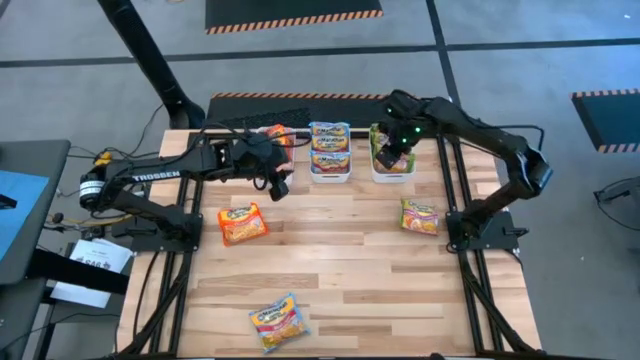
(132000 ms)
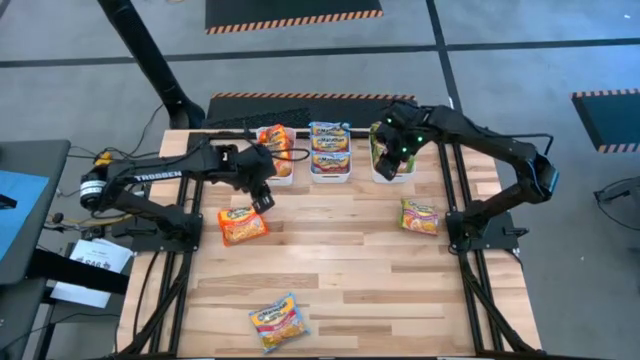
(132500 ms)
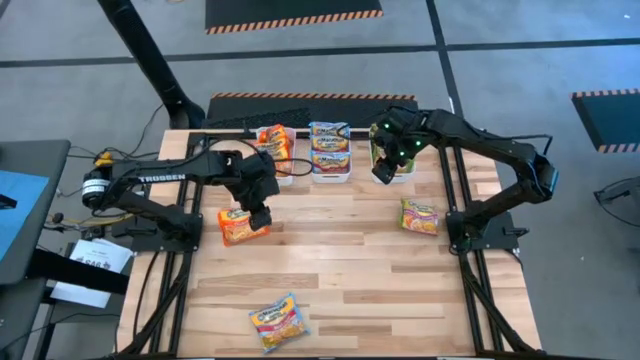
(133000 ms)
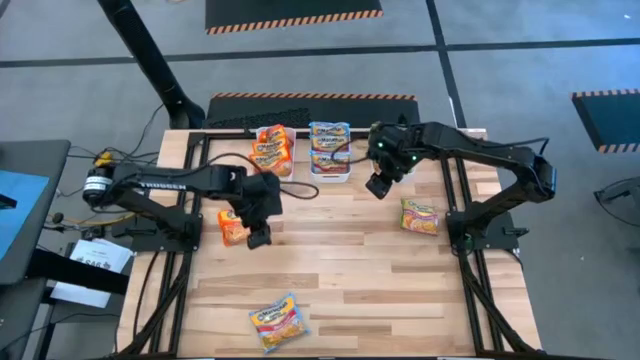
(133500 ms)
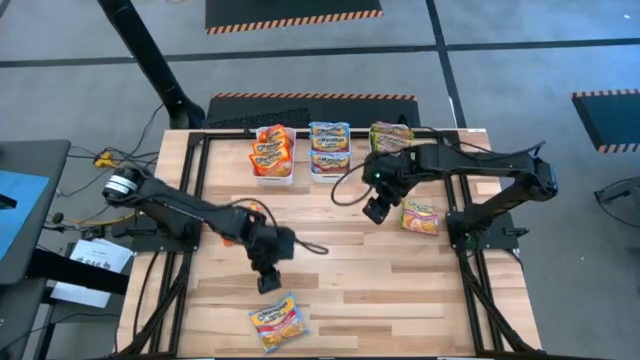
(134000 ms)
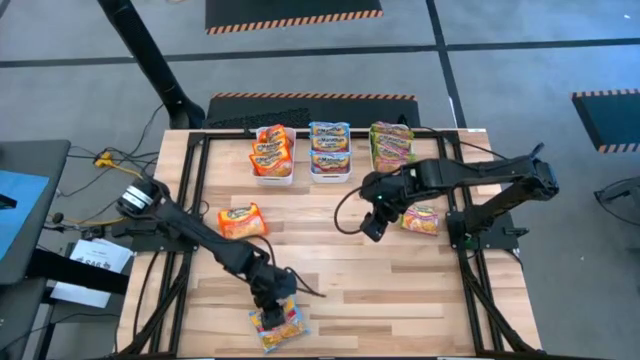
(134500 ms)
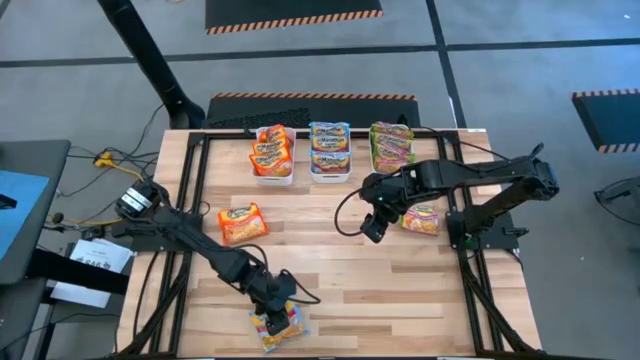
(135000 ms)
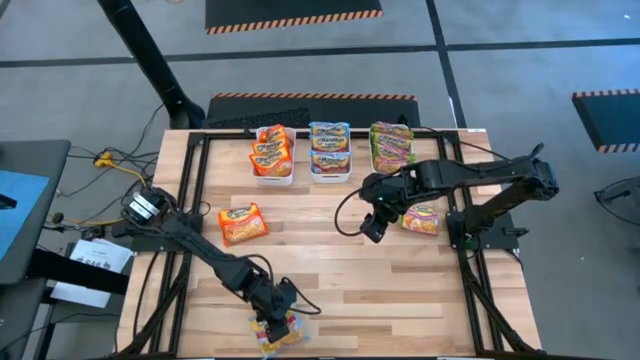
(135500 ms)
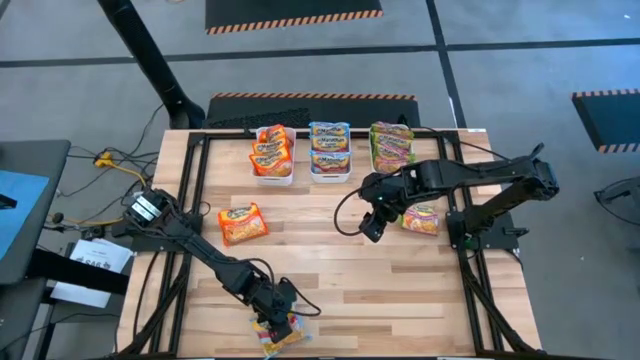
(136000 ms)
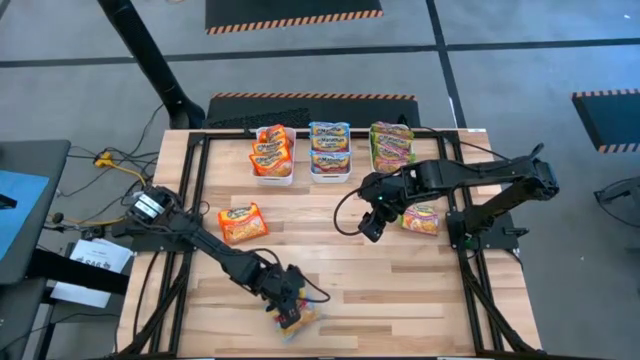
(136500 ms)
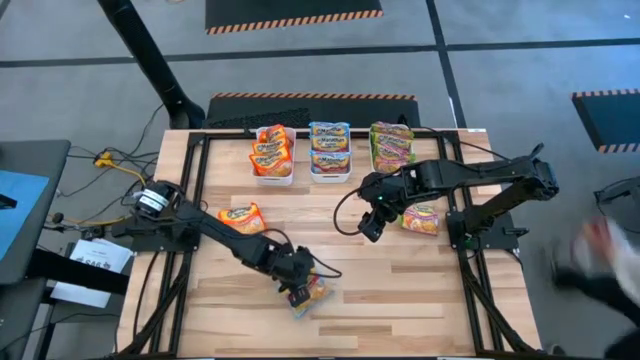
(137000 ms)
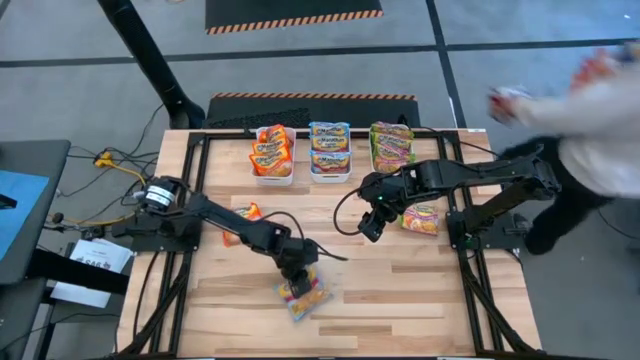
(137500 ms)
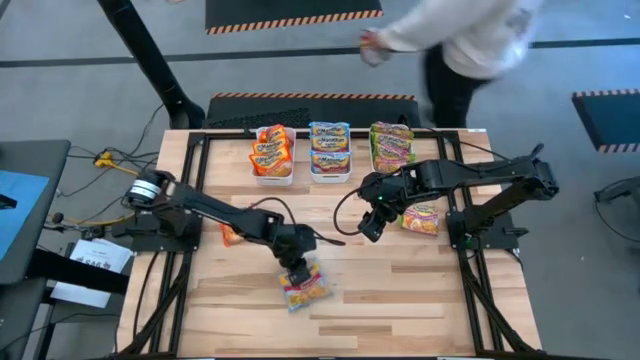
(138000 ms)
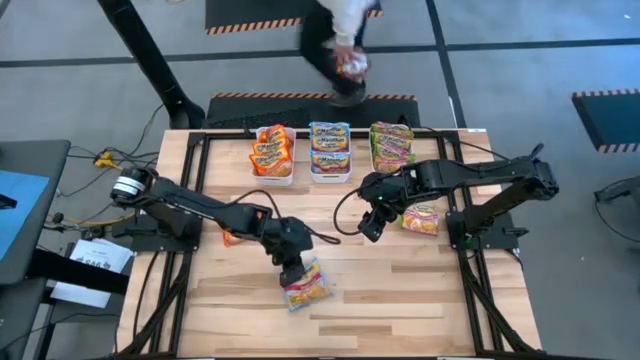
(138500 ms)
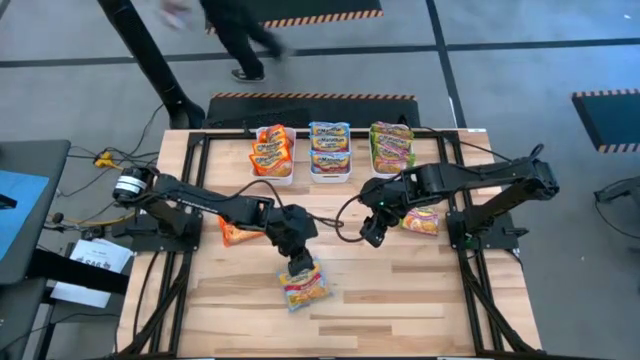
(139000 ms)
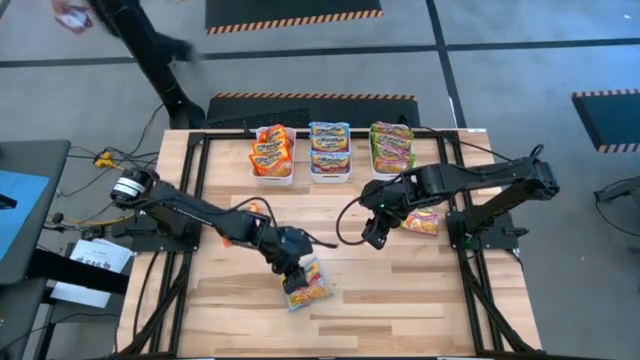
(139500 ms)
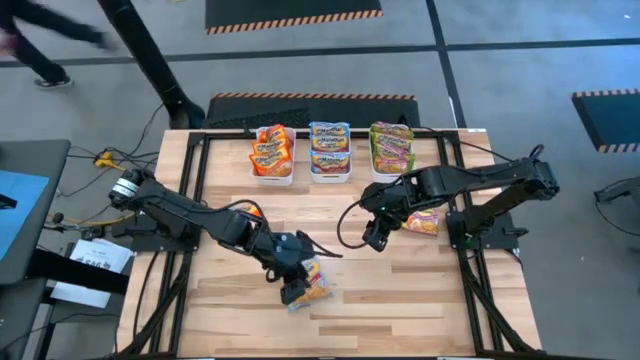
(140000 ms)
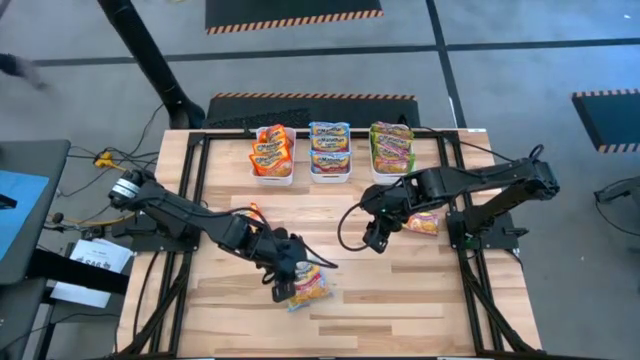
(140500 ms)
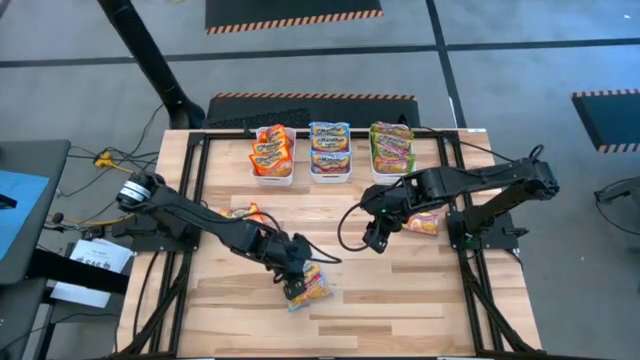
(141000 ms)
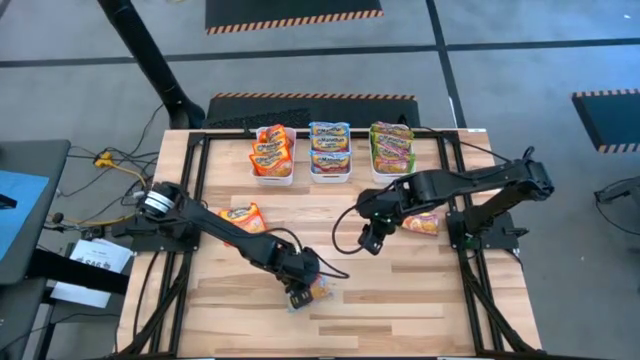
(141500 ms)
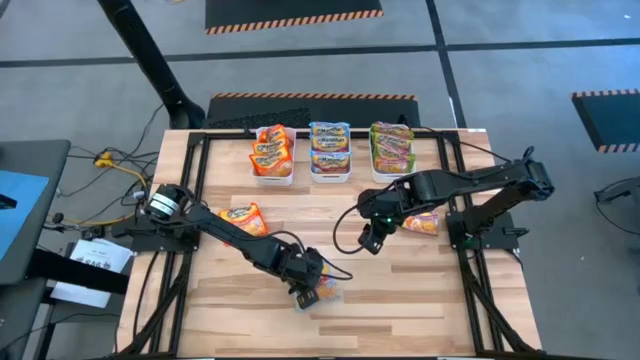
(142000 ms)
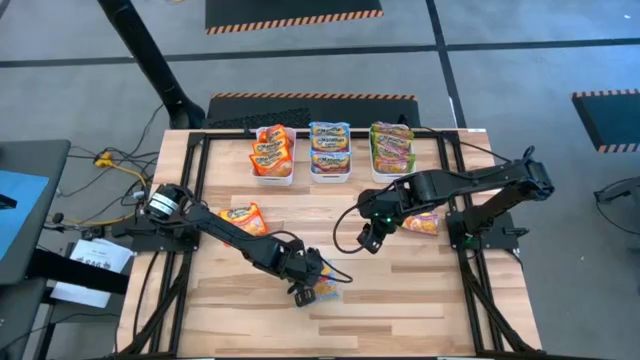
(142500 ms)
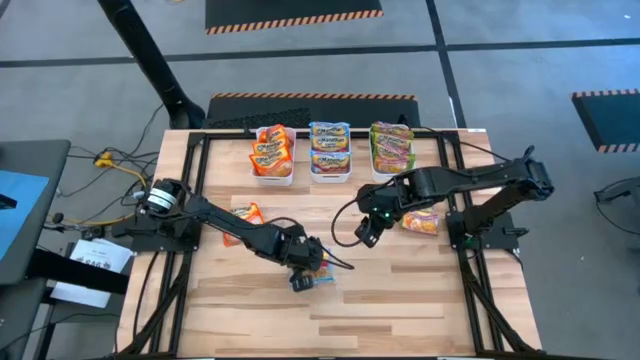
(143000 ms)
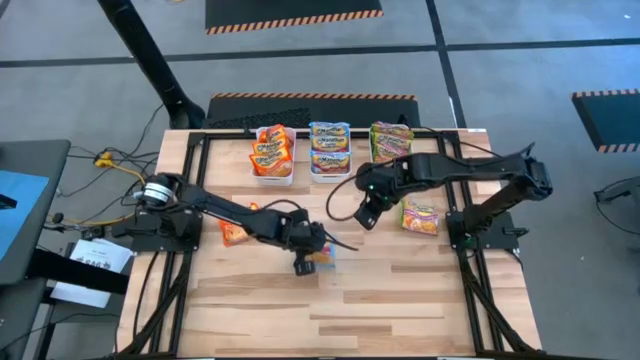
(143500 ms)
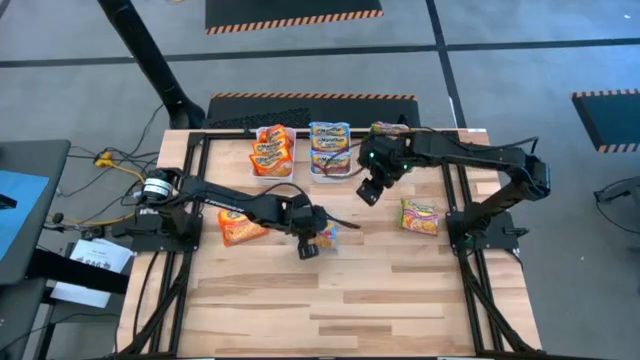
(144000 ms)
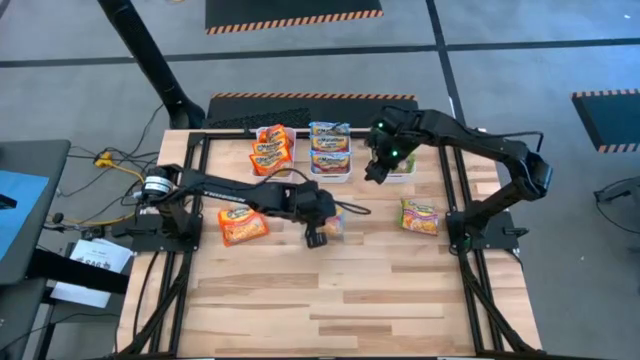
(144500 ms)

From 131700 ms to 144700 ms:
Task: Sort Maruchan noodles
Put the blue noodle pack into the center white bin

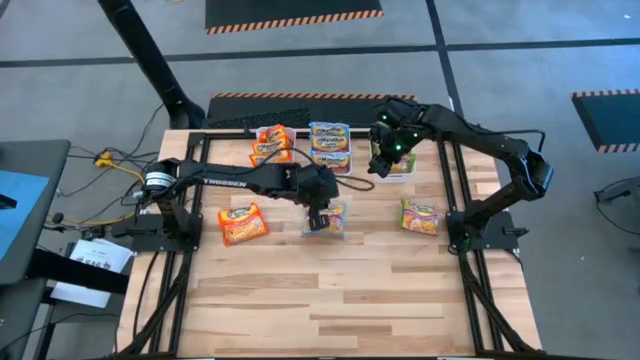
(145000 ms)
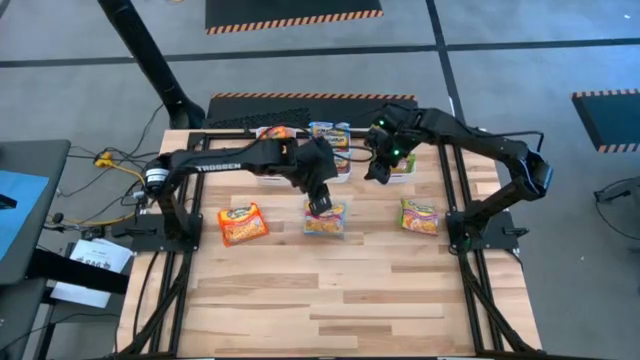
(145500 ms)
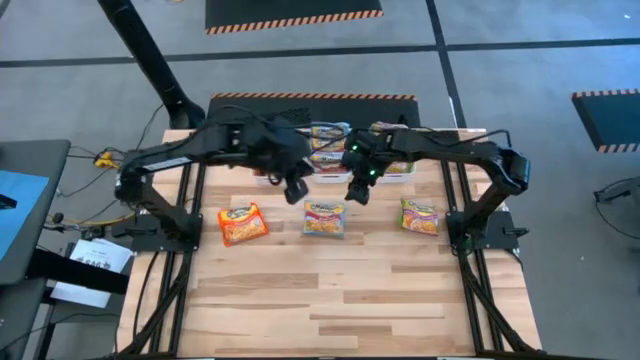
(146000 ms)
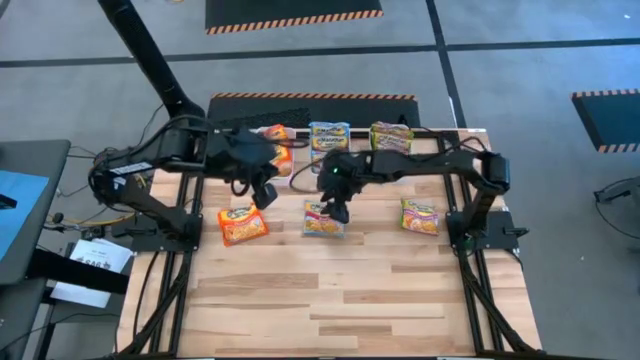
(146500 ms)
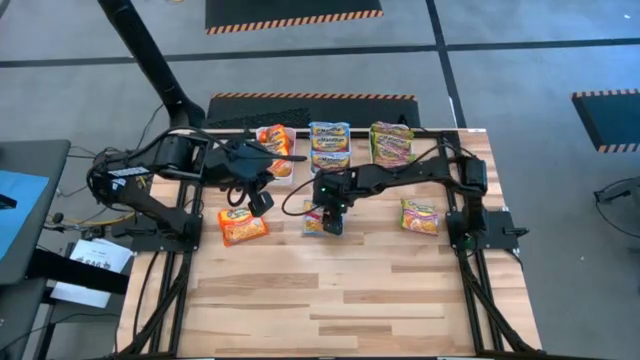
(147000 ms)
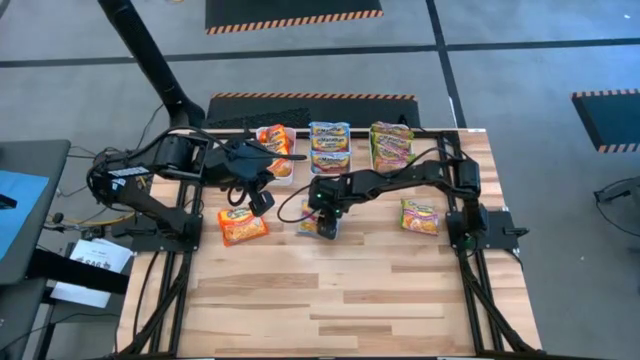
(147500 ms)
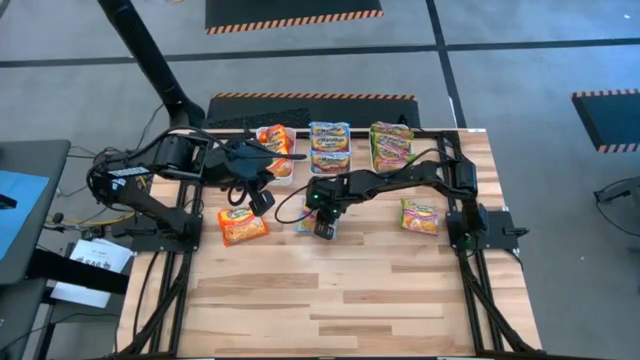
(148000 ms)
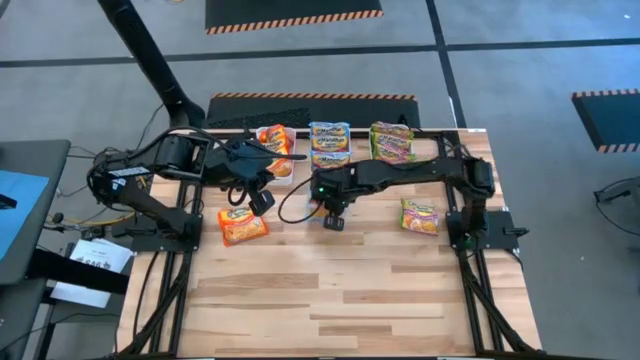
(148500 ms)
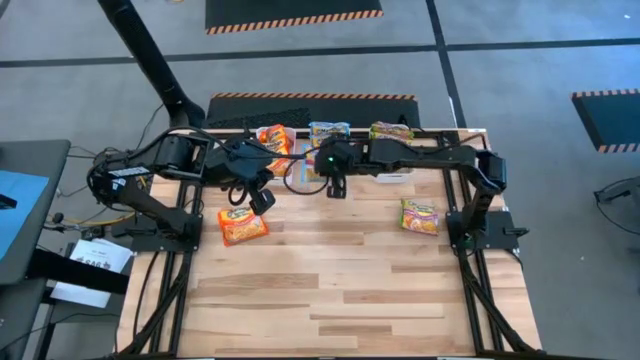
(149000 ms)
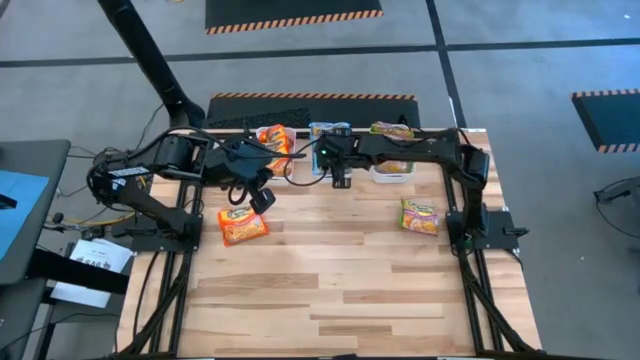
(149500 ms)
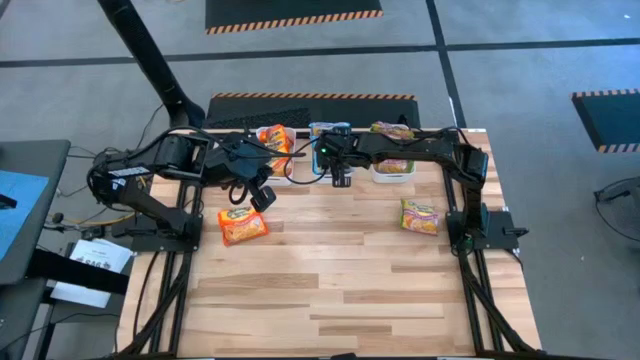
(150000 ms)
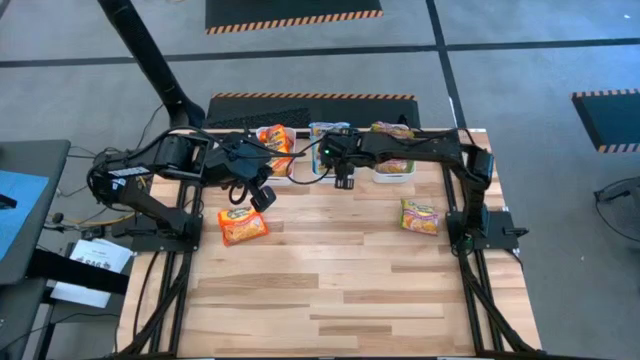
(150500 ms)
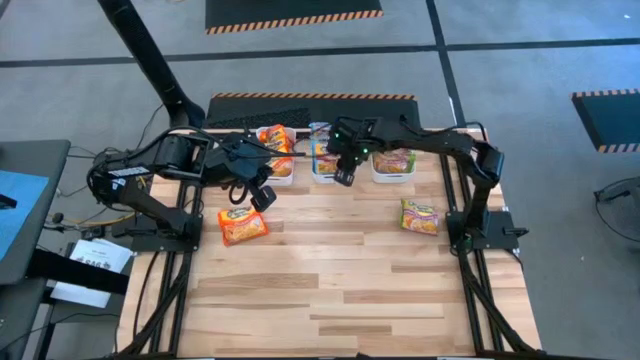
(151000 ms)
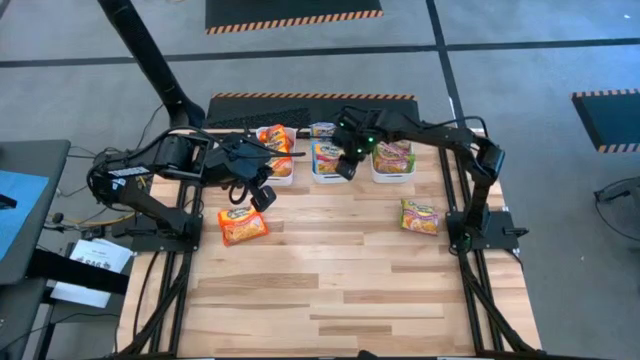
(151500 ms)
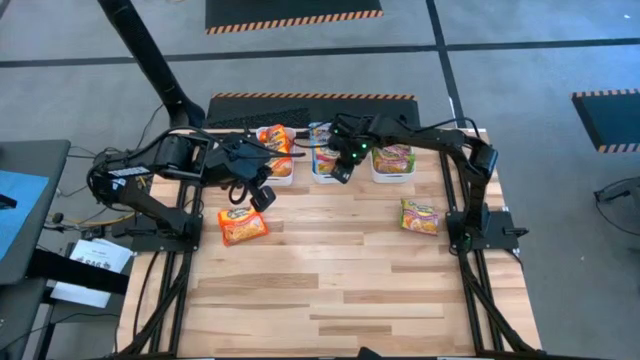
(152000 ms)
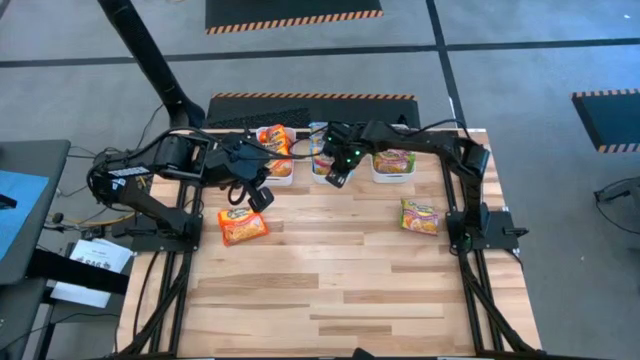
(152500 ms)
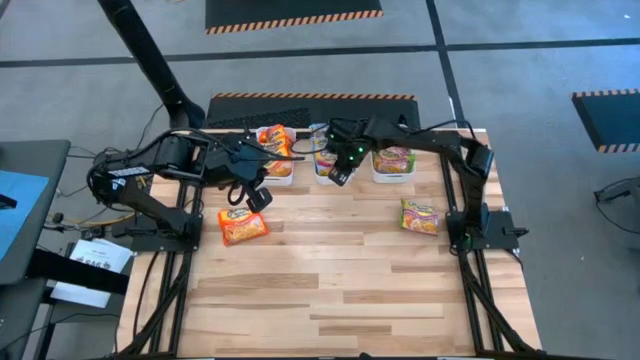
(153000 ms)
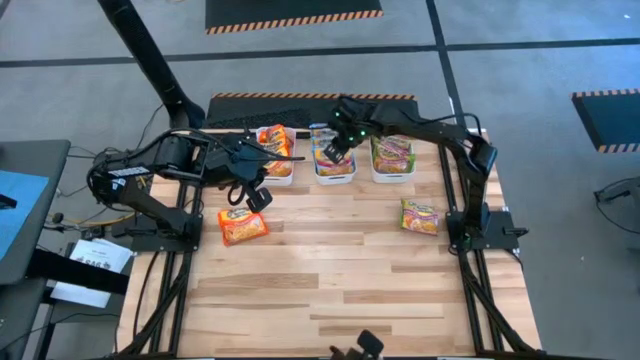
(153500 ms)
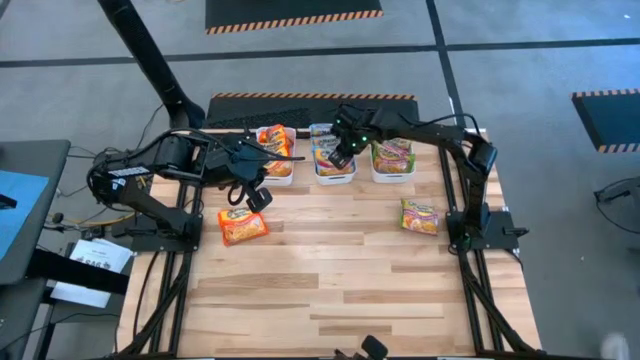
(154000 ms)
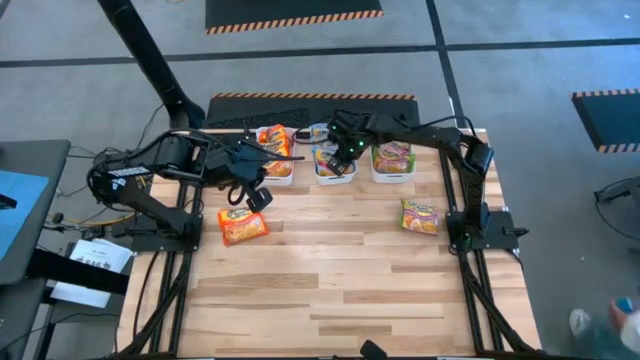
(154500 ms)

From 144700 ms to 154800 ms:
Put the blue noodle pack into the center white bin
